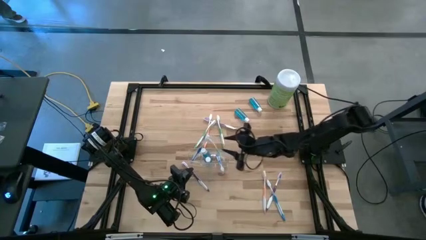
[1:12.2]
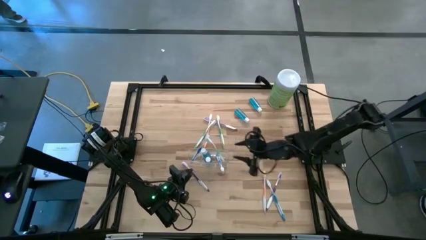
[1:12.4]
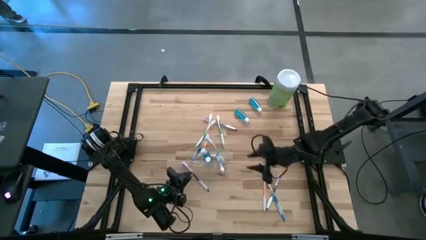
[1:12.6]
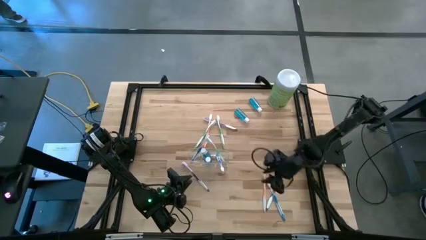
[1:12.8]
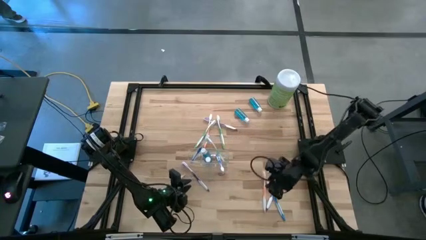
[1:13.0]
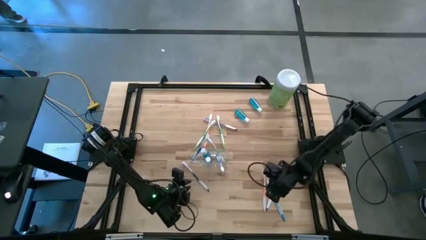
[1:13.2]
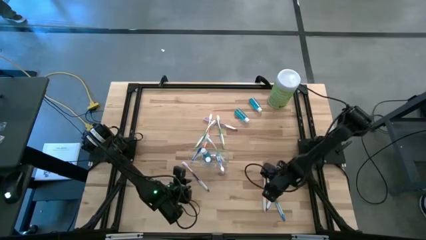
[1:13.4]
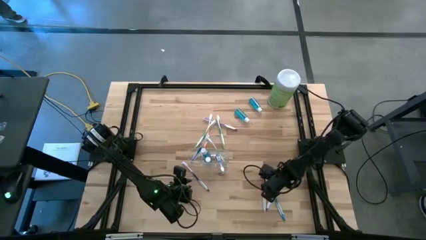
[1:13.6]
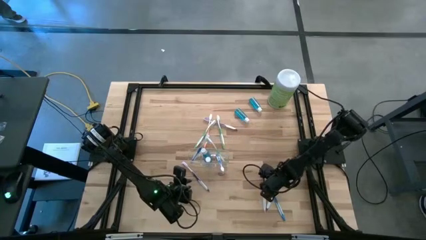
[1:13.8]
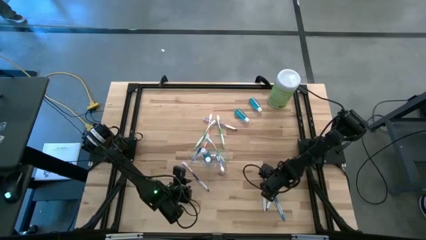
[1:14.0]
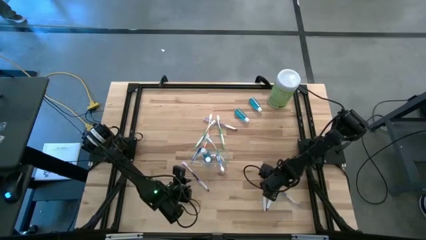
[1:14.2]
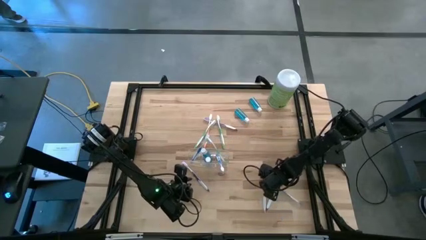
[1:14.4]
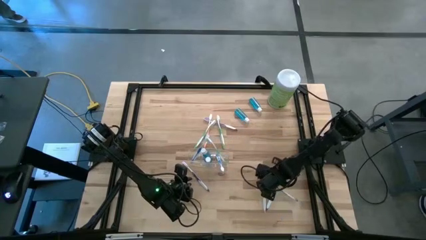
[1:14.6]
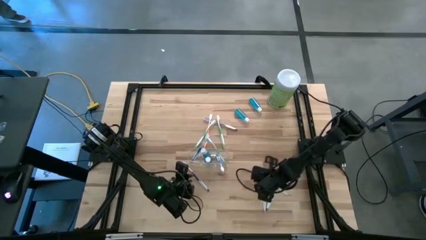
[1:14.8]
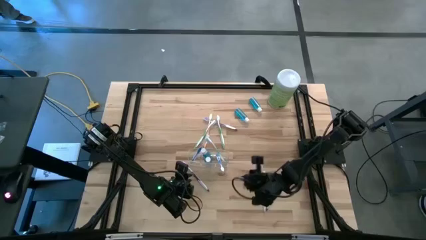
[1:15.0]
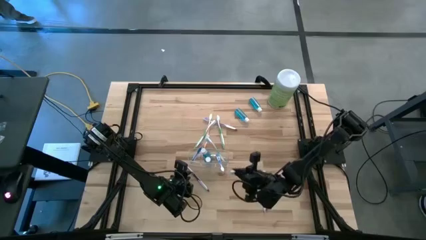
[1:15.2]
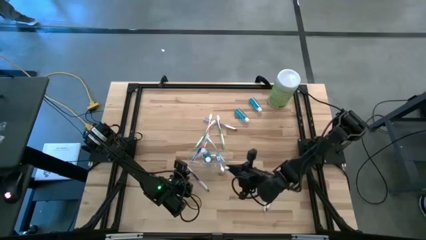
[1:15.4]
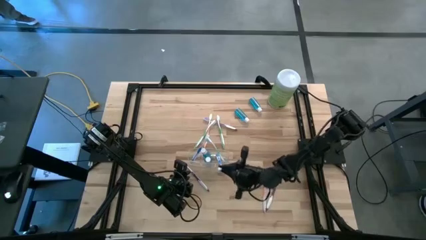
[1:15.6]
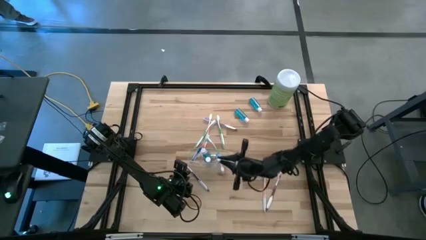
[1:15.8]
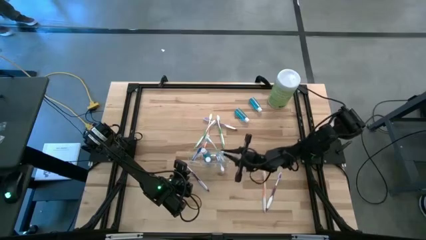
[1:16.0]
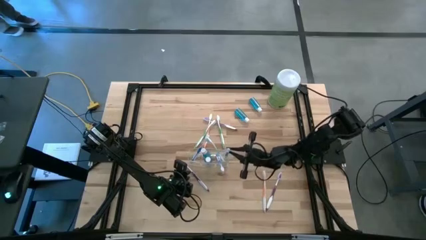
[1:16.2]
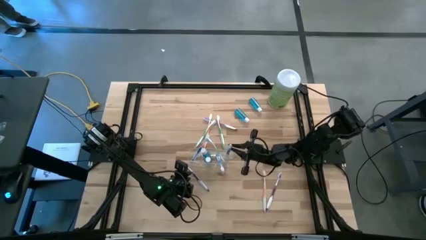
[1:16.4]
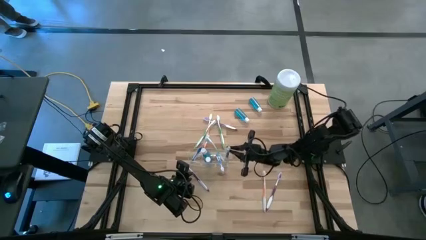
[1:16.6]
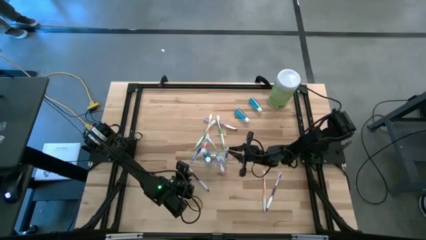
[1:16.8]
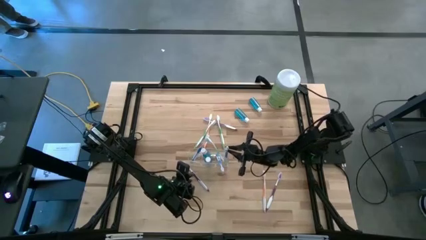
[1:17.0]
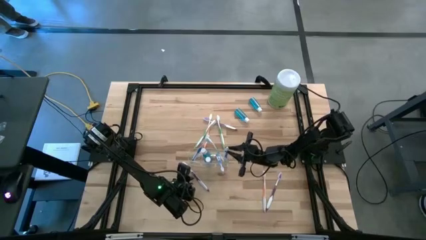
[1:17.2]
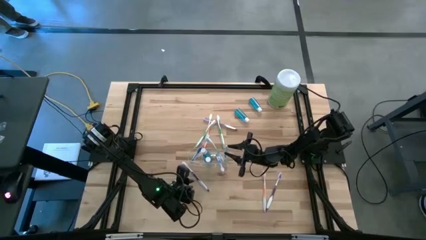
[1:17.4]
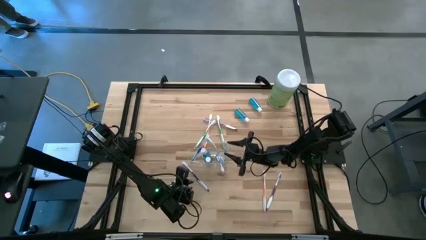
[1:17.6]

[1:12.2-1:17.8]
Task: Pick & Place toothbrushing station
Put the blue toothbrush into the right side of the transparent organizer

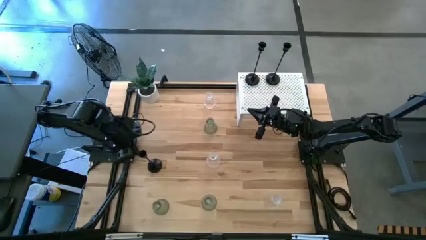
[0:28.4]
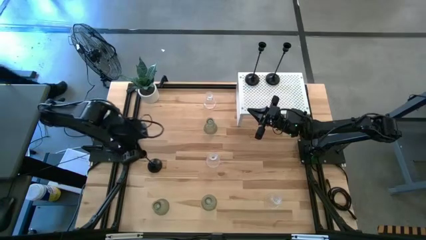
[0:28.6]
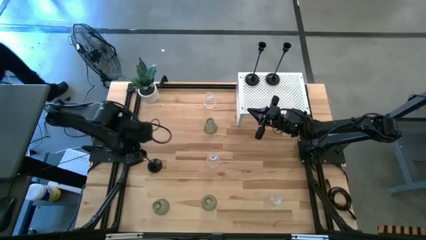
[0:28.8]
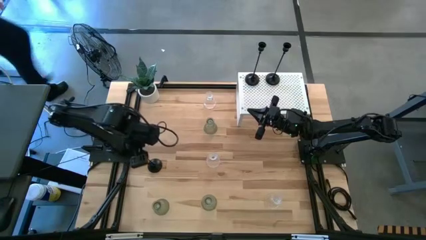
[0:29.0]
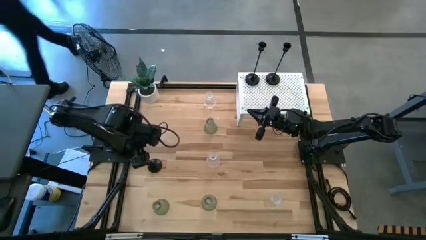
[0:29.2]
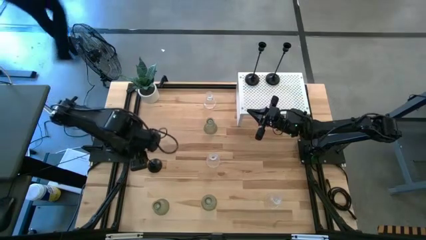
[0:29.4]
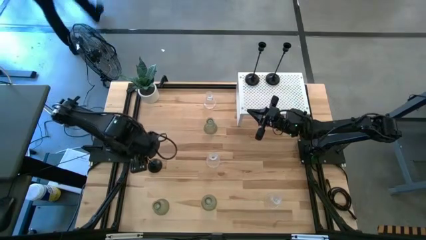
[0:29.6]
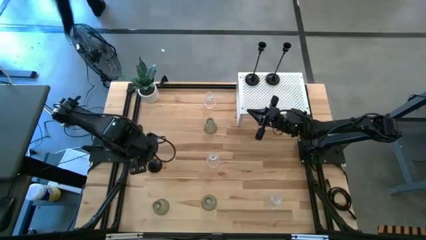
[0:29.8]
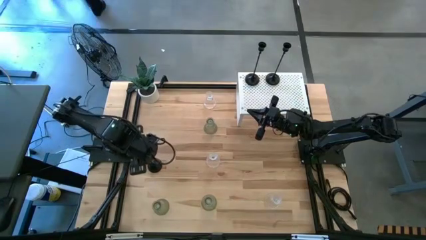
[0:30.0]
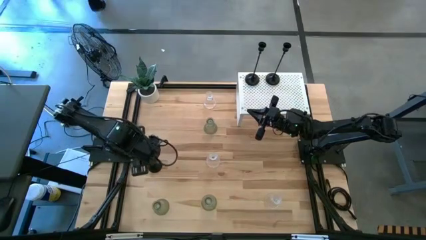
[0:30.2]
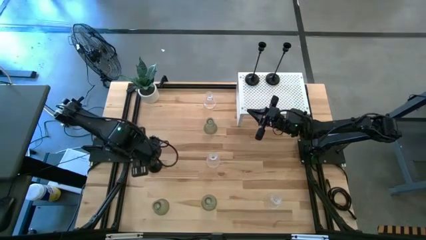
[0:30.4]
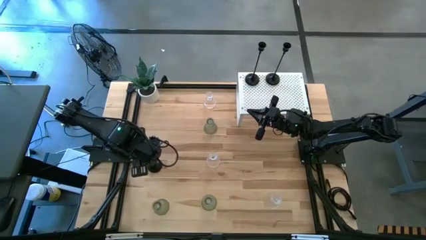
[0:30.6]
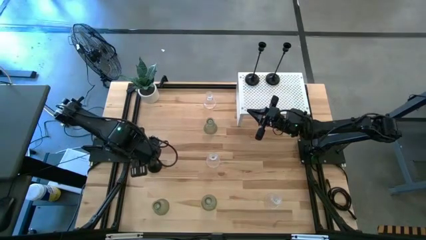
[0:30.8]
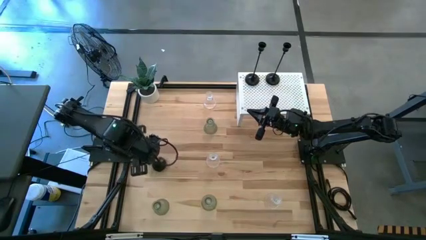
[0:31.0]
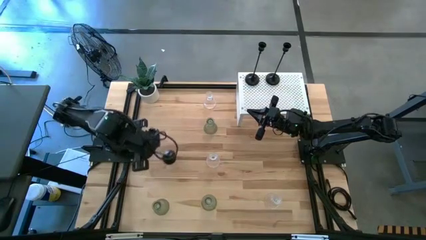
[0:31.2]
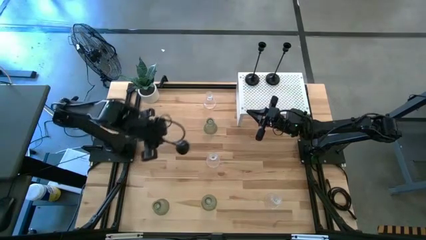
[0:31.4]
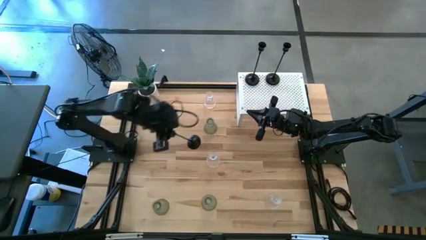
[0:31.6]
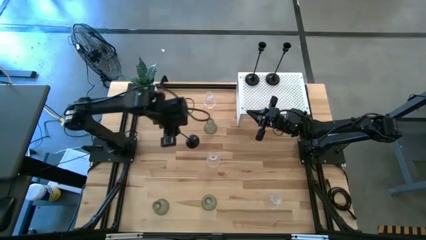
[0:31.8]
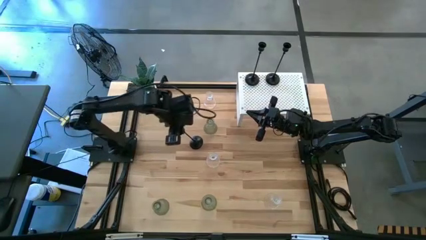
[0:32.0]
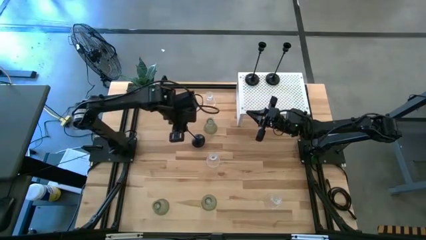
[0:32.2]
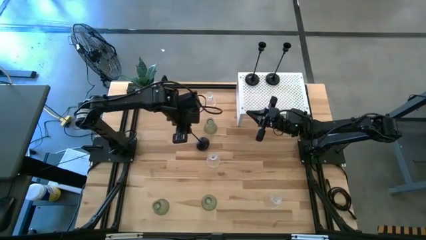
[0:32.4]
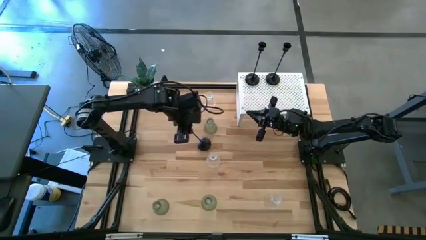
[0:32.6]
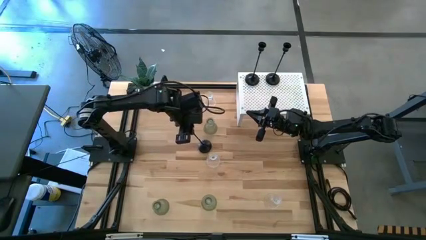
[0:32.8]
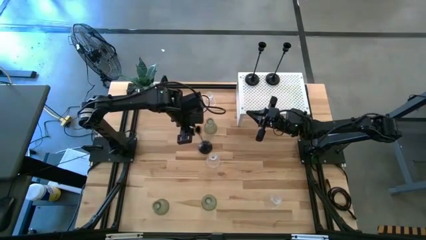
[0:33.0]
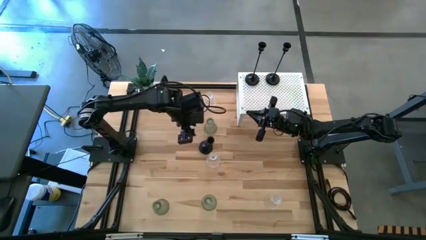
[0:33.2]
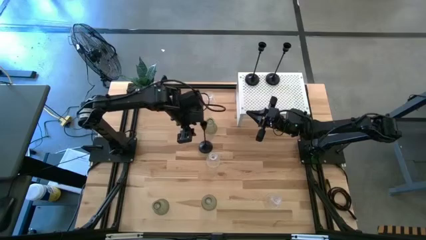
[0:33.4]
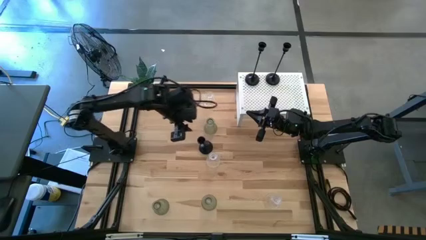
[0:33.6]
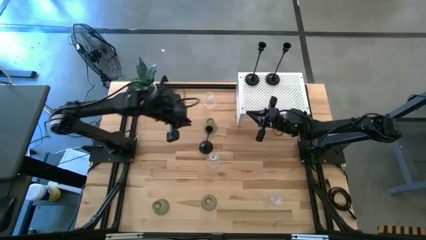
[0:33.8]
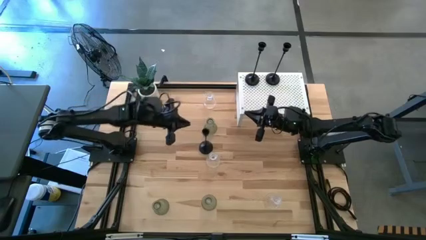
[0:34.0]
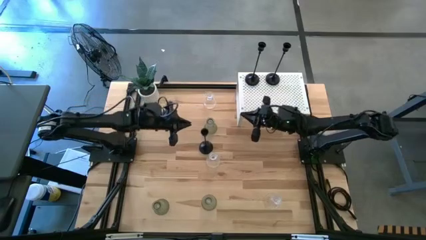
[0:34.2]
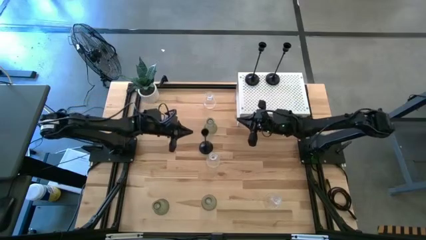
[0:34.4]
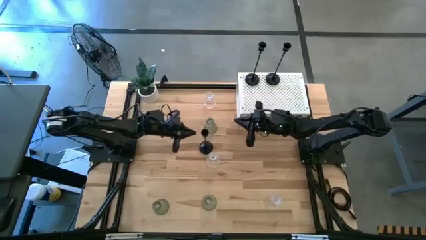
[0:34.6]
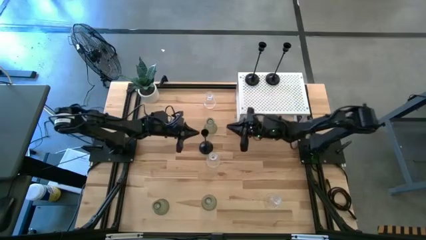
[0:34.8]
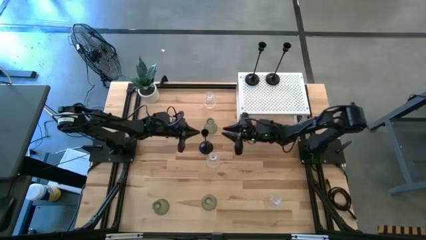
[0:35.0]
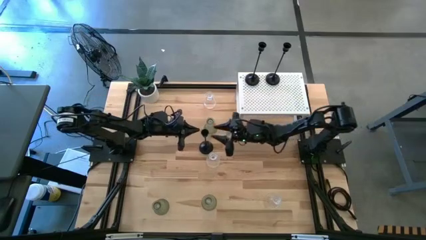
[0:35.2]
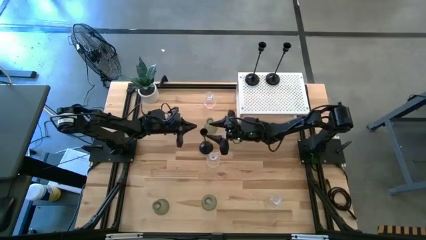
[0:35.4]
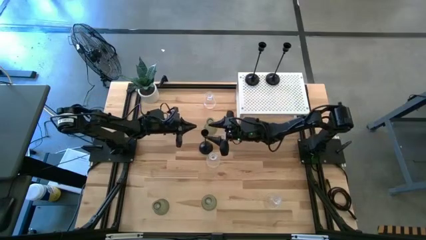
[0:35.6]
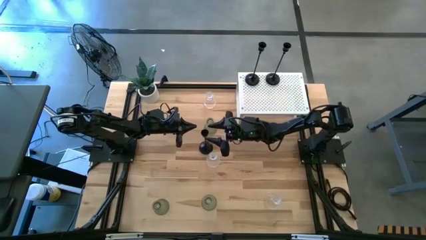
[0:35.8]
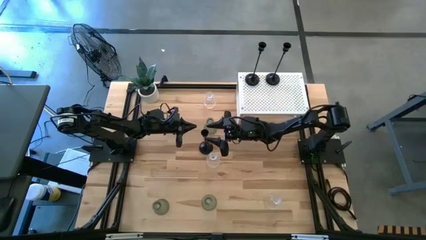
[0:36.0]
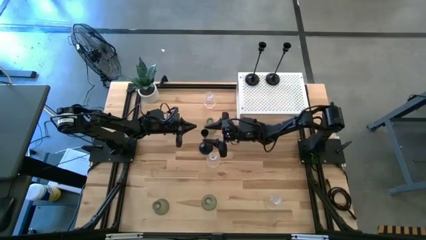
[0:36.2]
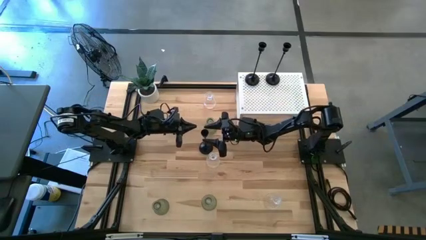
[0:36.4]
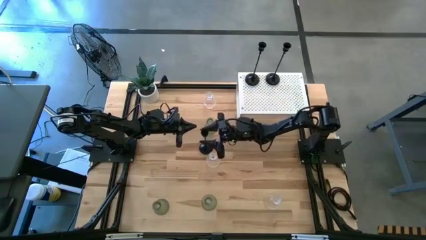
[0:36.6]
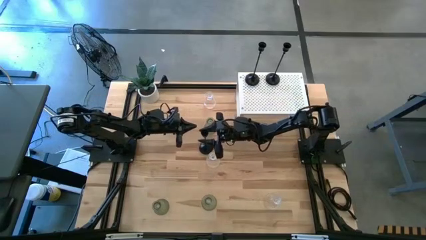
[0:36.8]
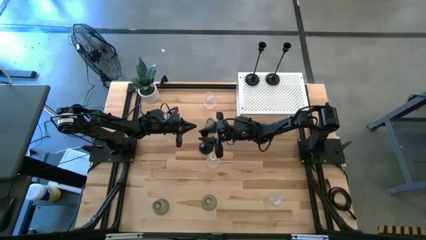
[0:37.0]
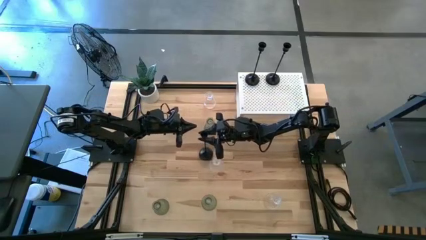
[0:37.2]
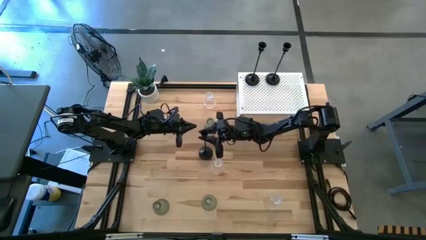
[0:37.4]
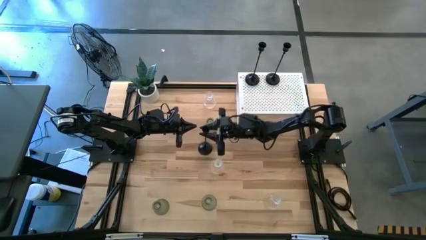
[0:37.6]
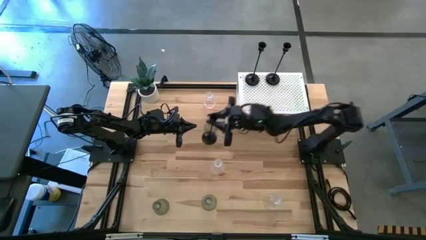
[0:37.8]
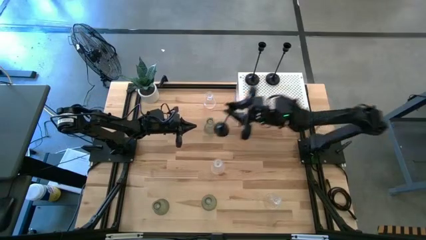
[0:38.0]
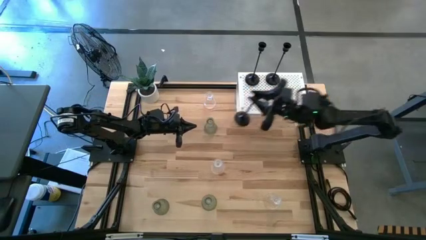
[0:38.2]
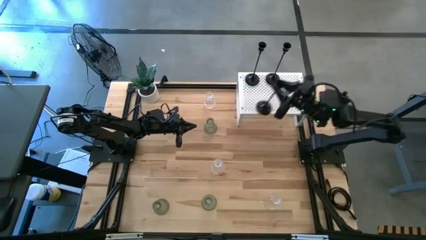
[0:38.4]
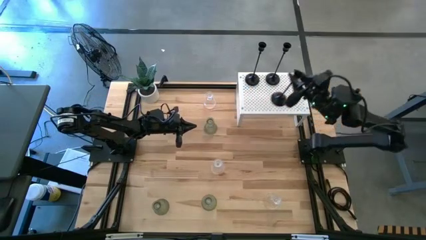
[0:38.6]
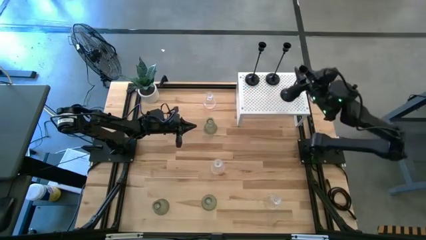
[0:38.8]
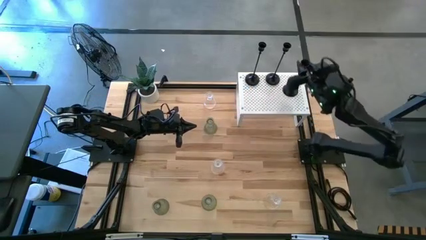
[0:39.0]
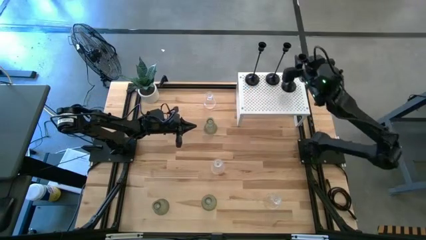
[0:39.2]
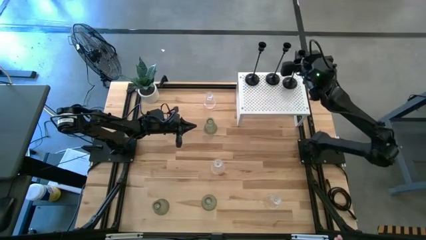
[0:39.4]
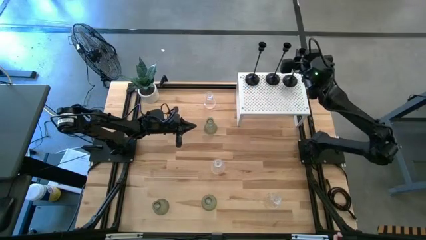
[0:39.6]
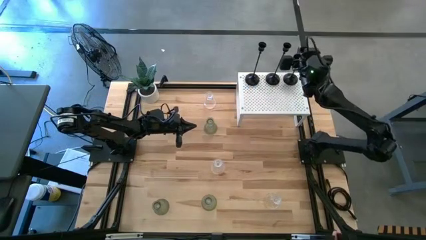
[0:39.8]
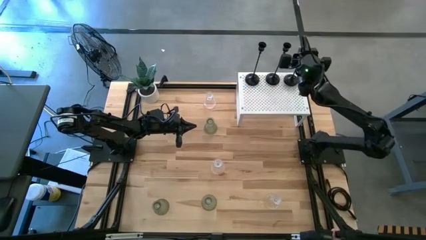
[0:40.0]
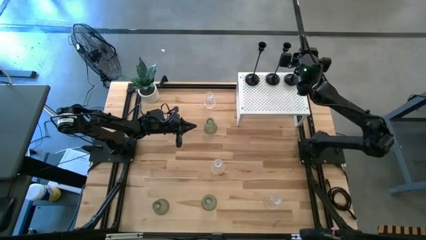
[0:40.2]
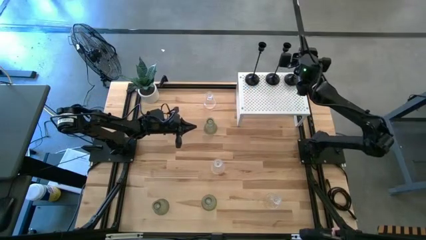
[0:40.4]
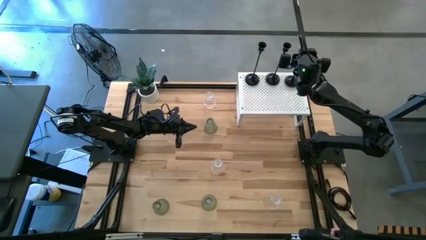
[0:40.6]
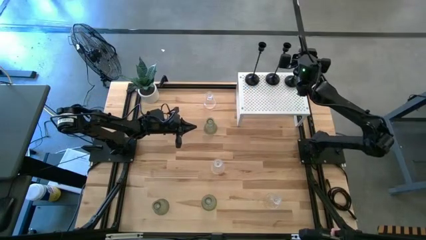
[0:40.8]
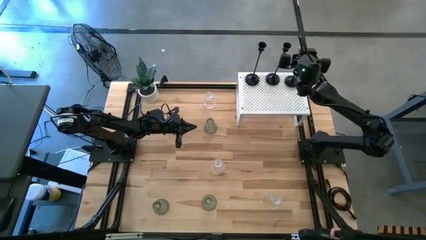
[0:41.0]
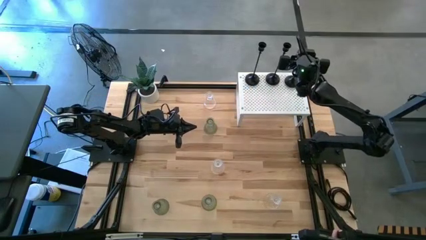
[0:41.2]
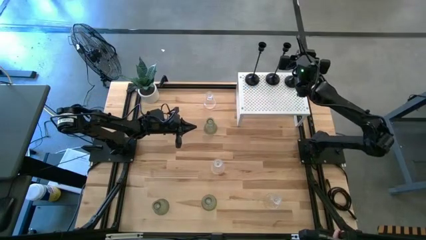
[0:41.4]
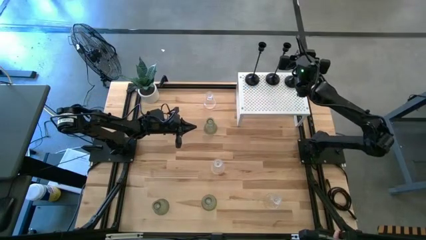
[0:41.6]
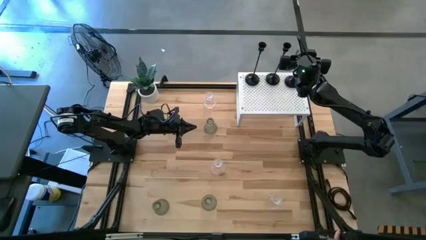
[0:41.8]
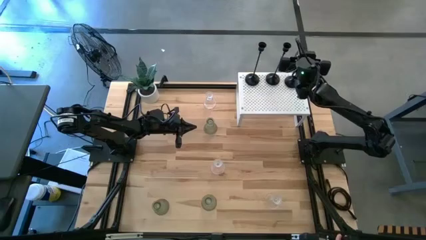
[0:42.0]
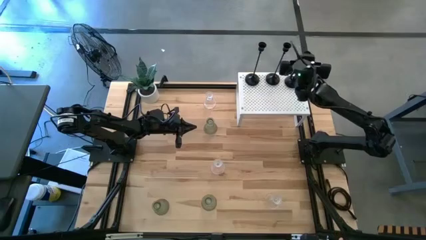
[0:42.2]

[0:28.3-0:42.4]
Task: Pick & Place candle stick holders
Put the black candle holder on the shelf aligned with the other black candle holder
